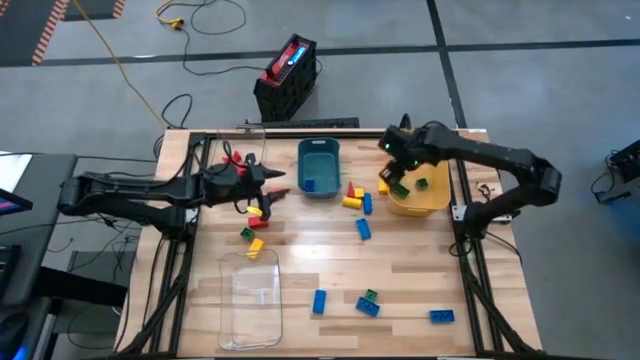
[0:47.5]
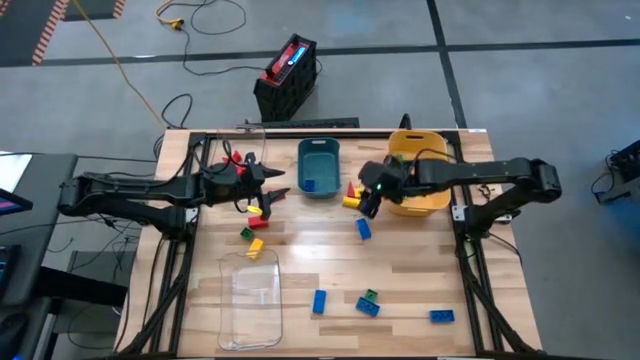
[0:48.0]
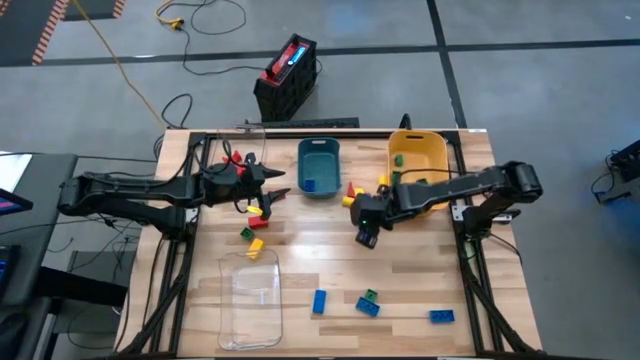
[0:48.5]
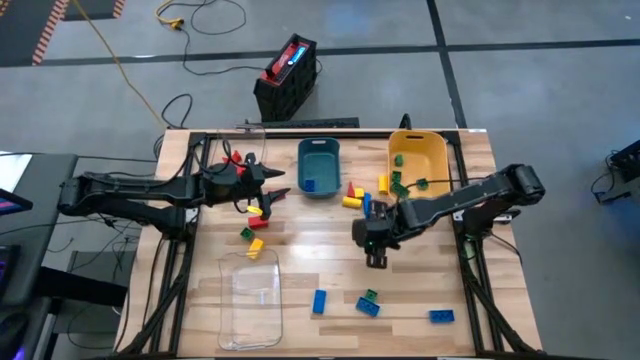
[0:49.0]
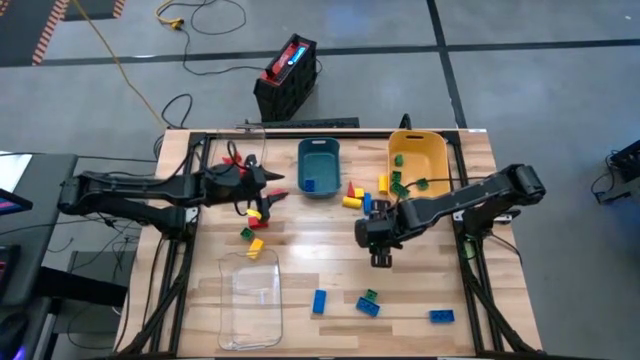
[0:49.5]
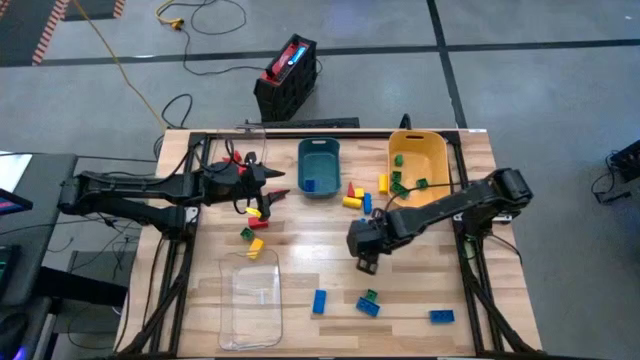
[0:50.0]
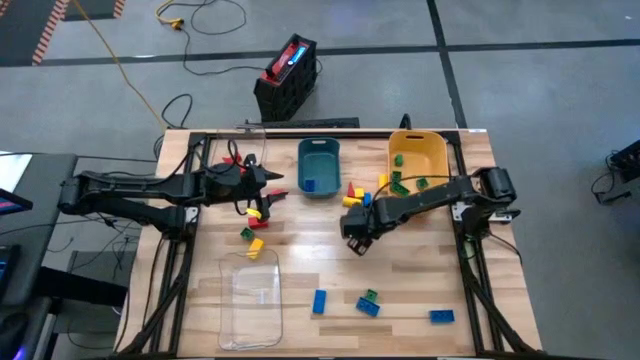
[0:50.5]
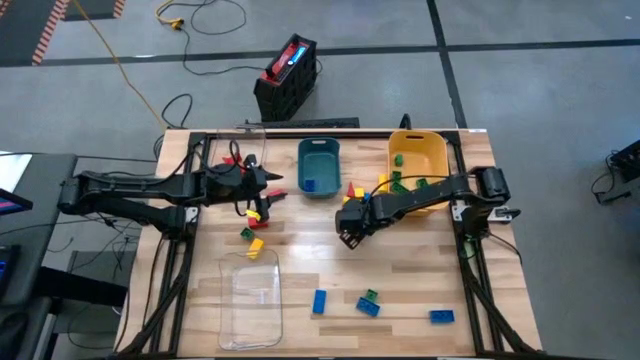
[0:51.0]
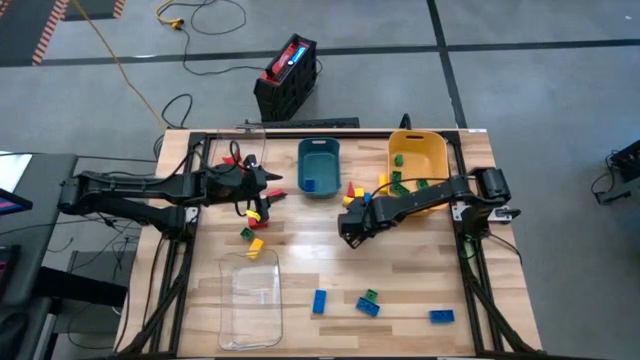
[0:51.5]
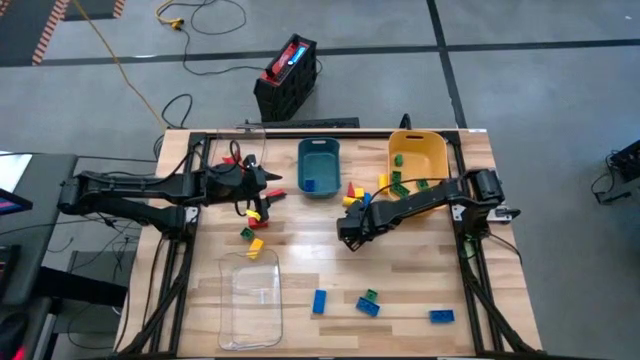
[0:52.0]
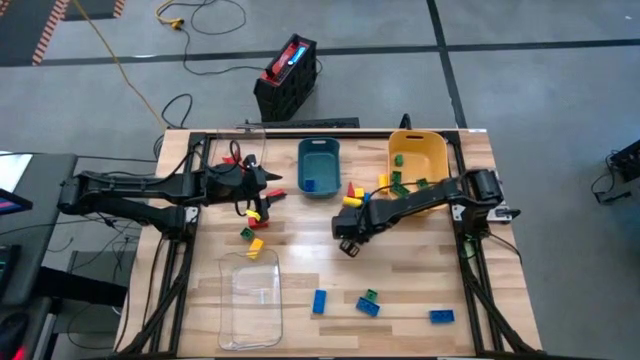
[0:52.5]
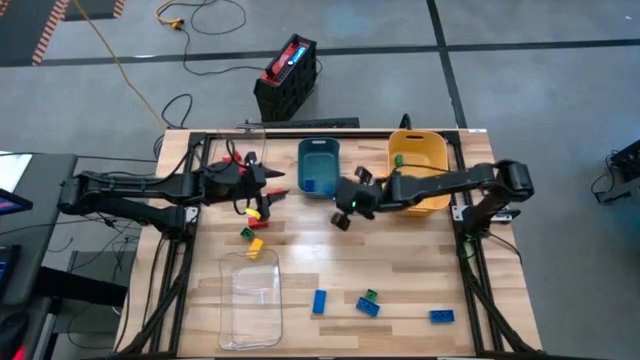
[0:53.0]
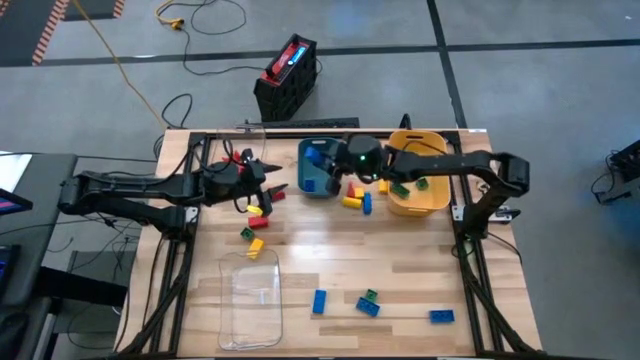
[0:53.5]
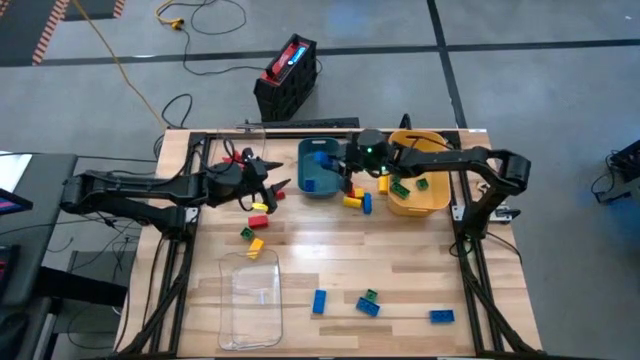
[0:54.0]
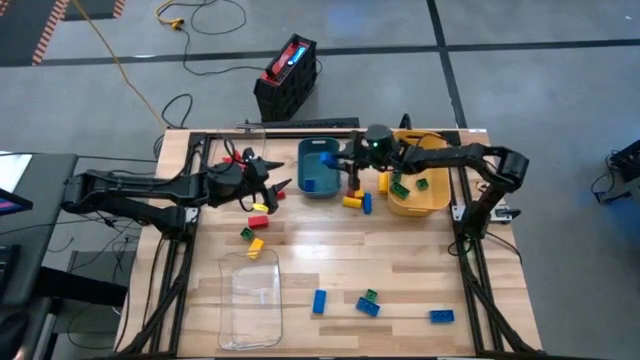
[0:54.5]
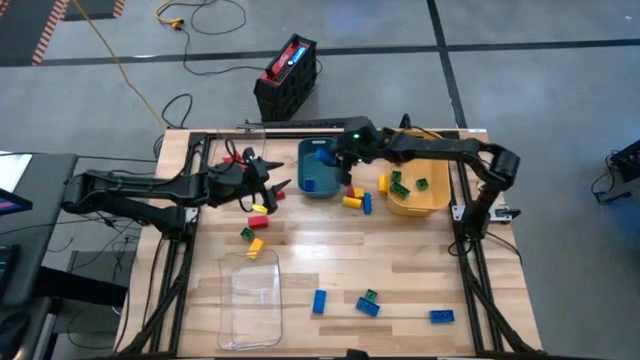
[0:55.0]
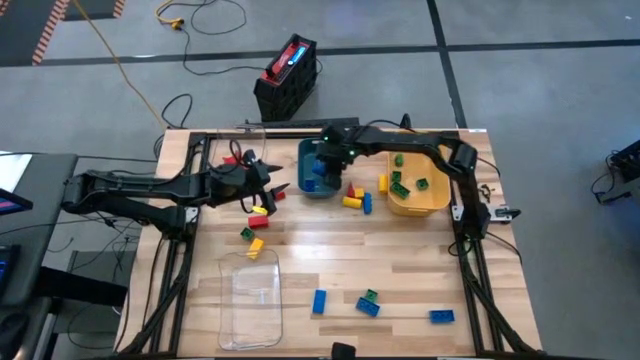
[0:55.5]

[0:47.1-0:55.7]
Task: Sort blocks
Put the blue game piece into the blue bin

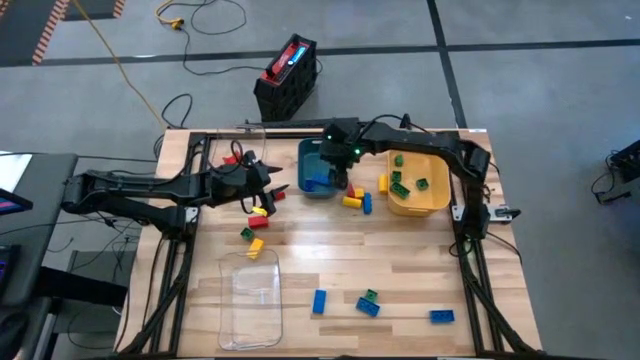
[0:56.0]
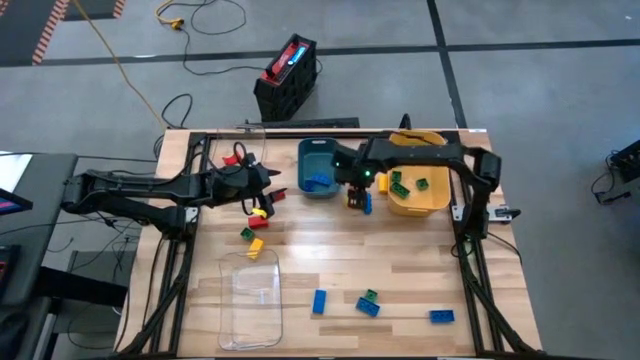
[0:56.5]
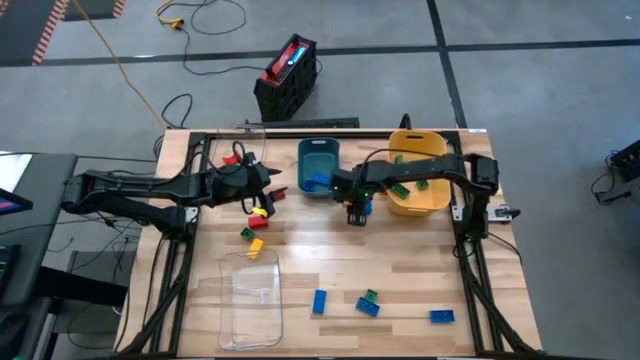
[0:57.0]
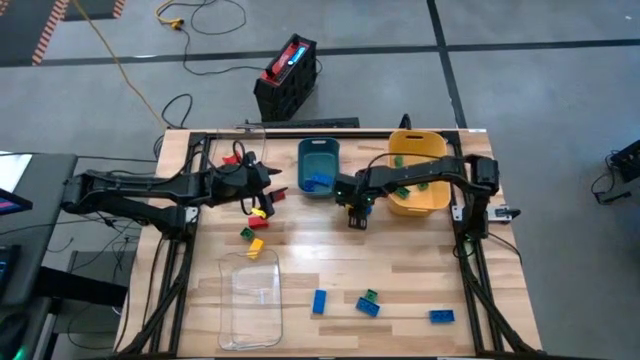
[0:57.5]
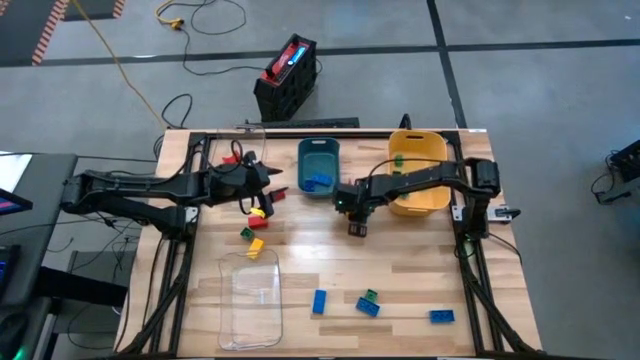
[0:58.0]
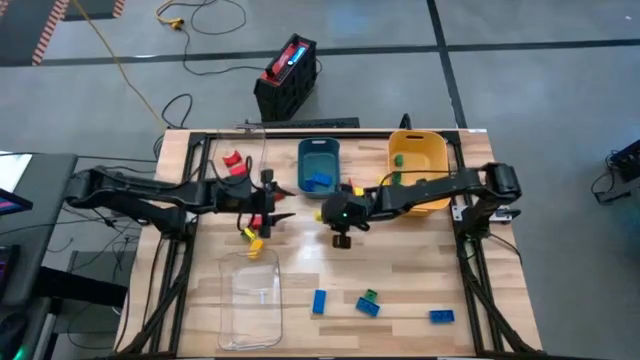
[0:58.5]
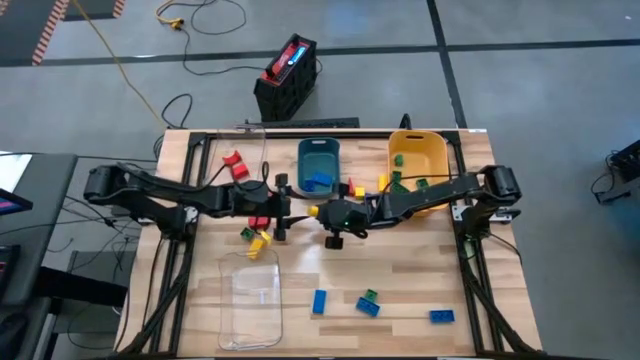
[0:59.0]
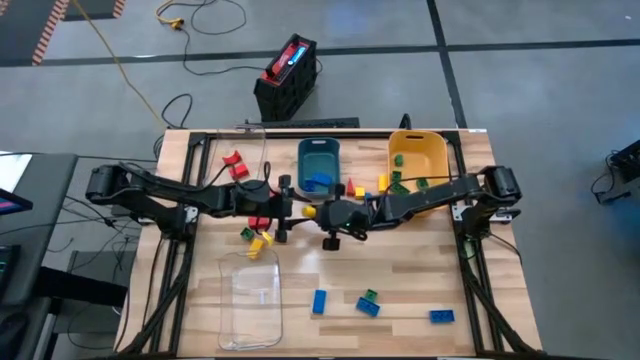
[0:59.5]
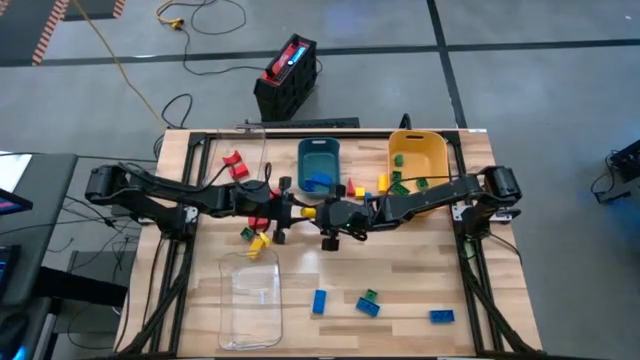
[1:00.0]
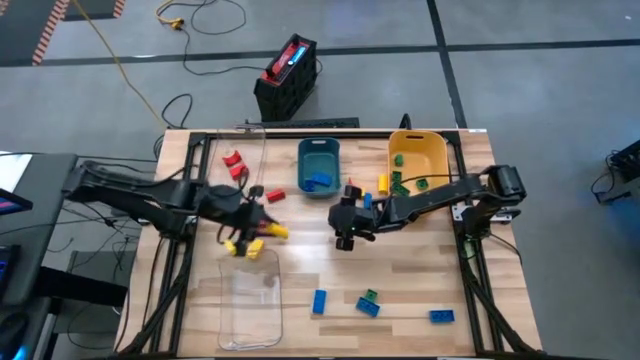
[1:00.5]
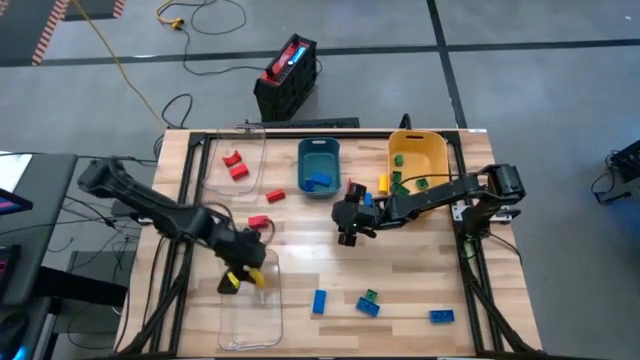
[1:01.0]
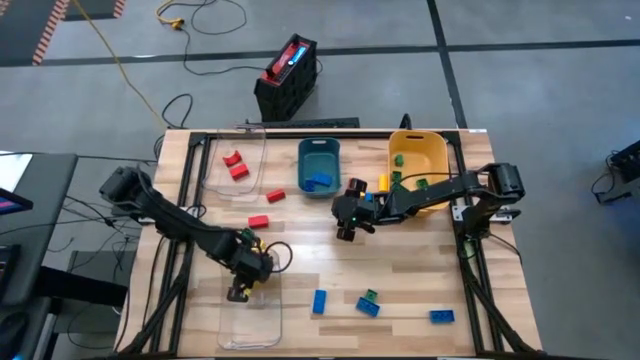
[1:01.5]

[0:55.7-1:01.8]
Put the yellow block into the bottom transparent bin

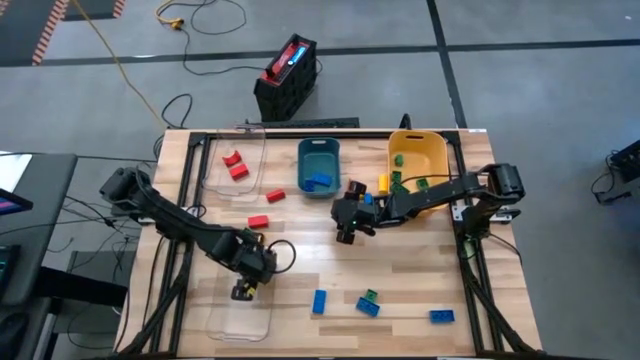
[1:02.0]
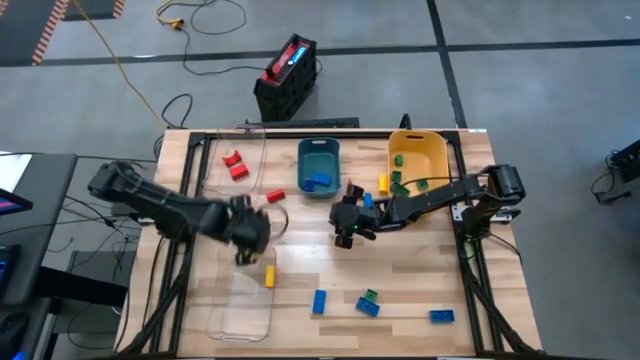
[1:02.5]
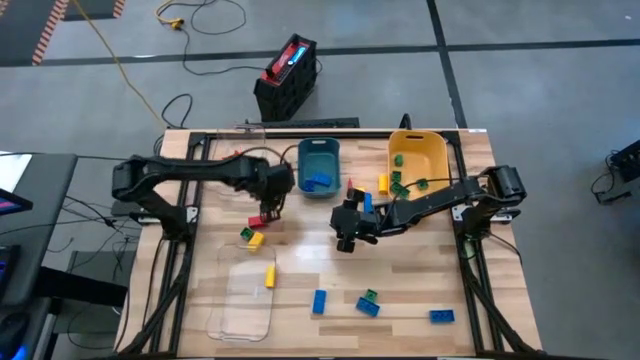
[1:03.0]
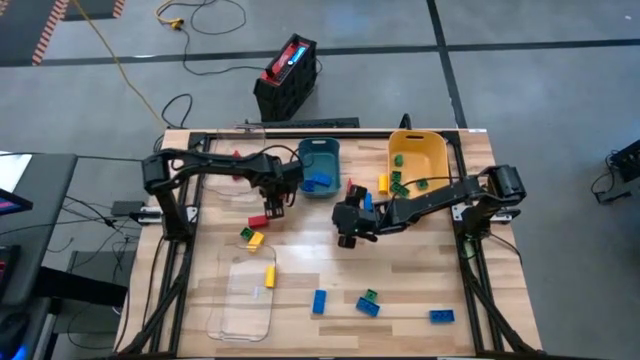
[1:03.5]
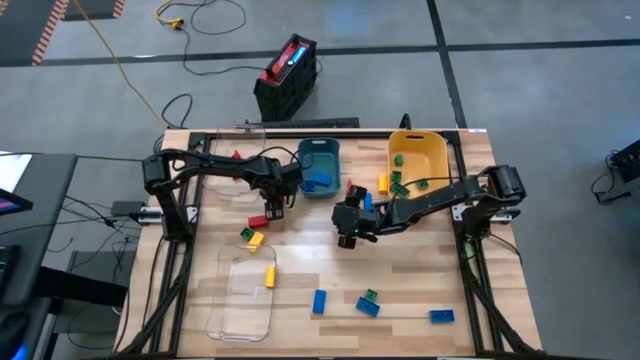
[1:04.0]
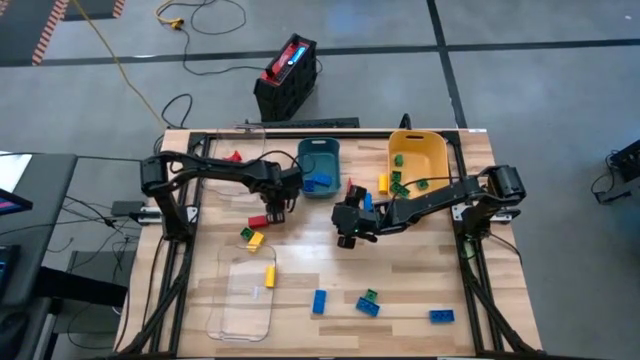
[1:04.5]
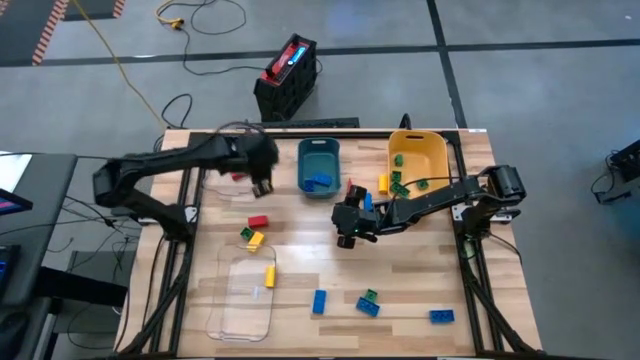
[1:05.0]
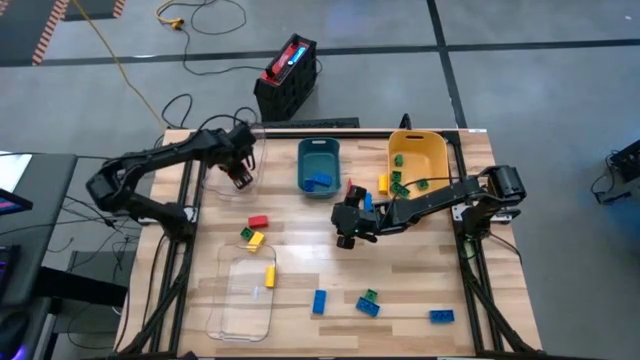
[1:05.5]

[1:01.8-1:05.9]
Put the red block into the top transparent bin

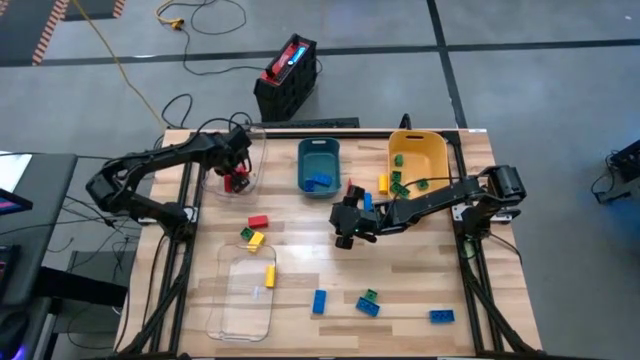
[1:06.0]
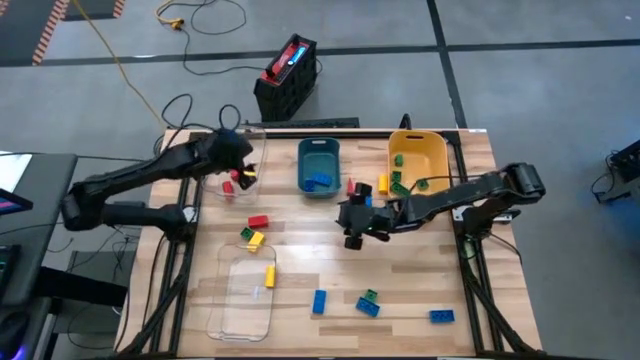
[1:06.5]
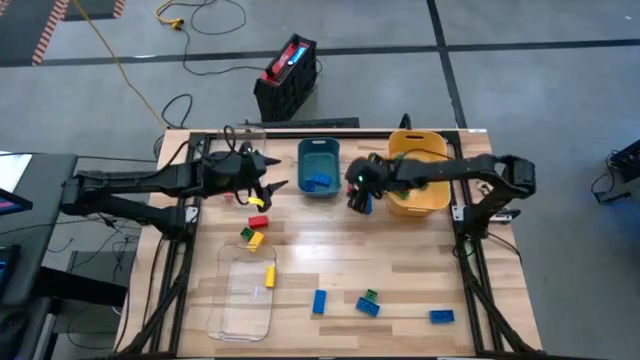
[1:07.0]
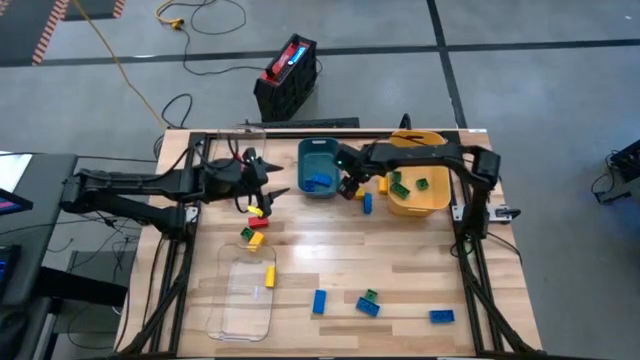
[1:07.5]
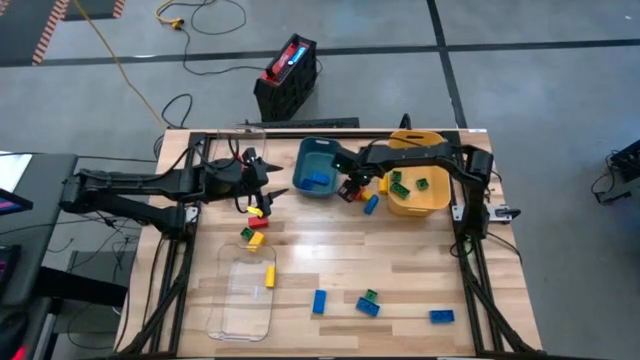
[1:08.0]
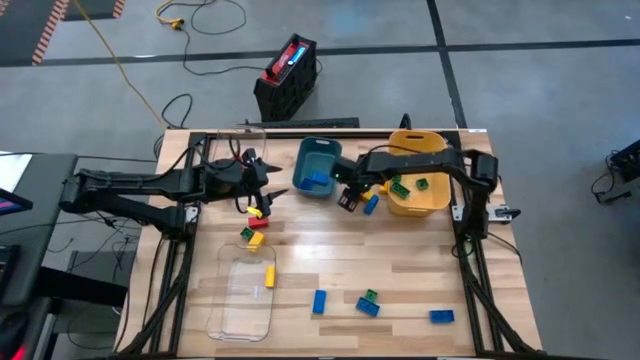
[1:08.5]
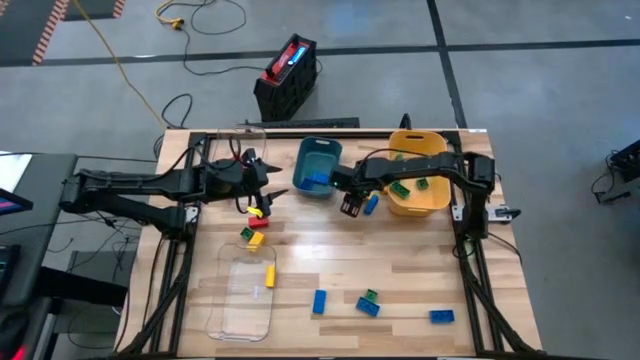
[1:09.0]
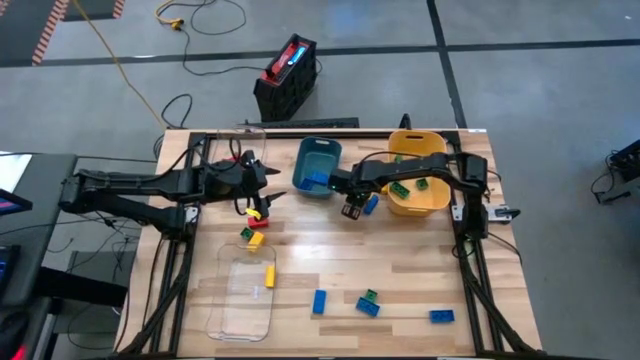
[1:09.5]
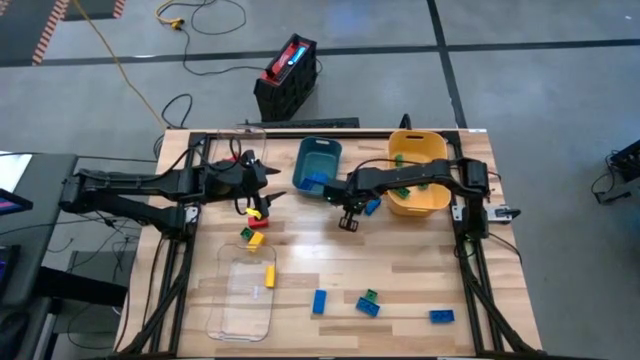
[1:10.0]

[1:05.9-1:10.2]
Put the red block into the top transparent bin
